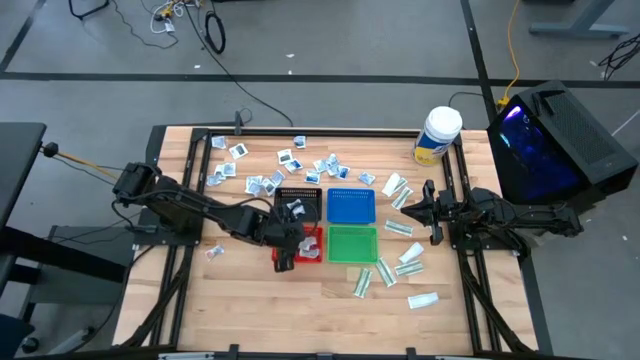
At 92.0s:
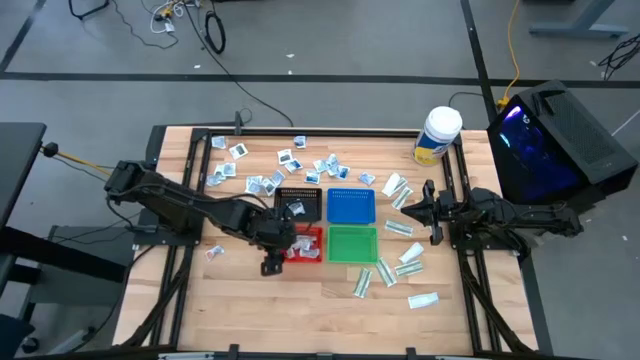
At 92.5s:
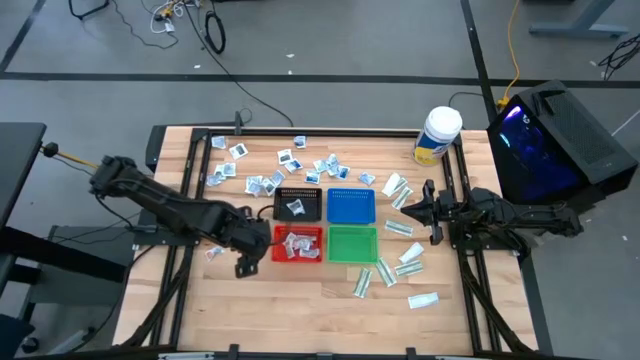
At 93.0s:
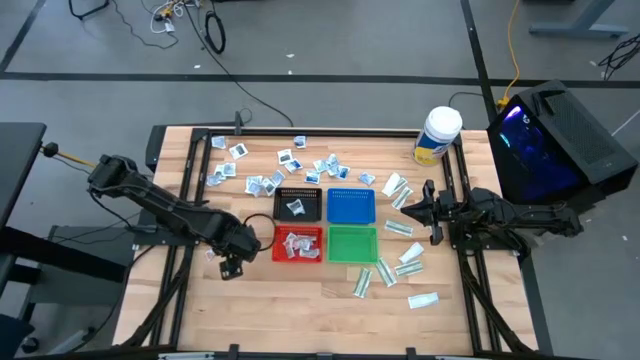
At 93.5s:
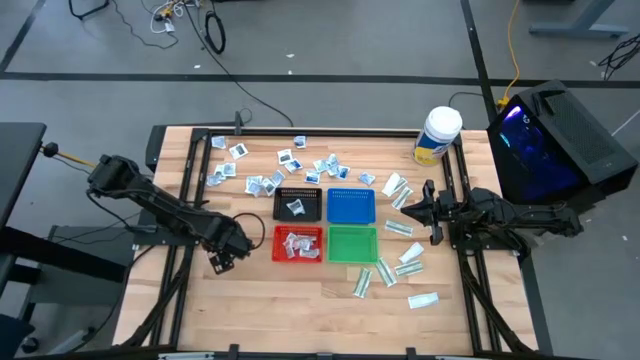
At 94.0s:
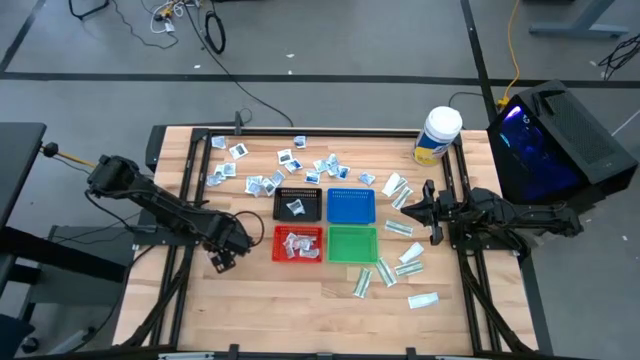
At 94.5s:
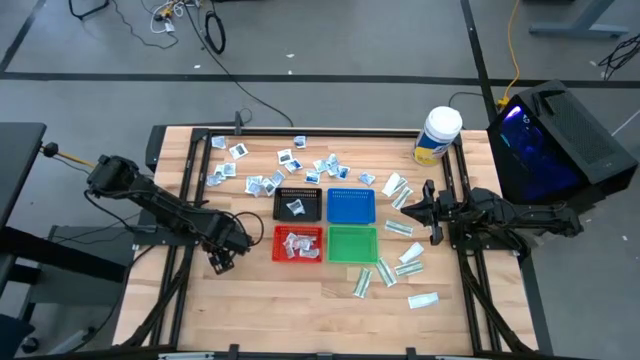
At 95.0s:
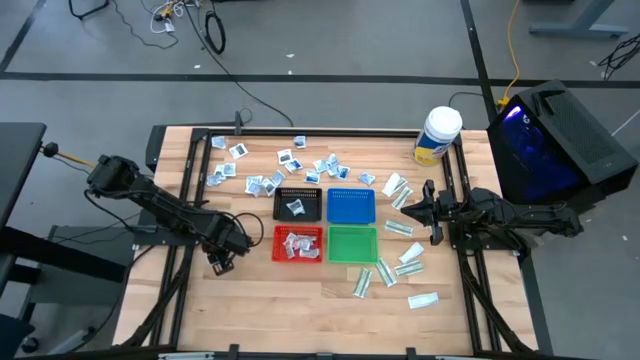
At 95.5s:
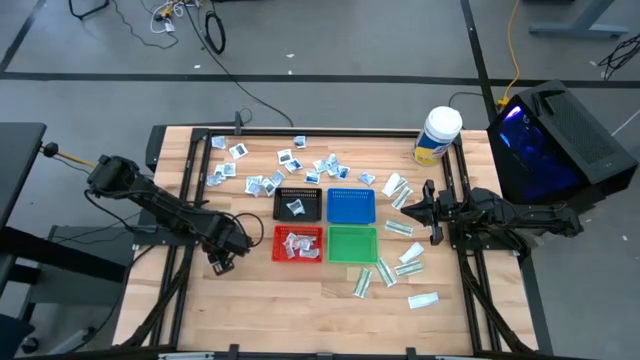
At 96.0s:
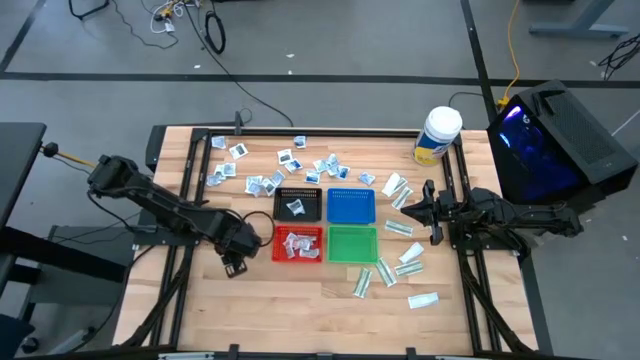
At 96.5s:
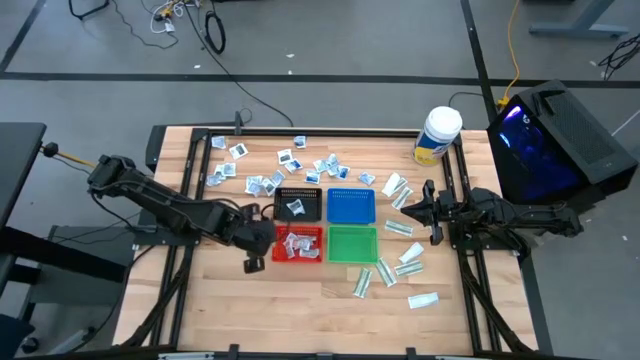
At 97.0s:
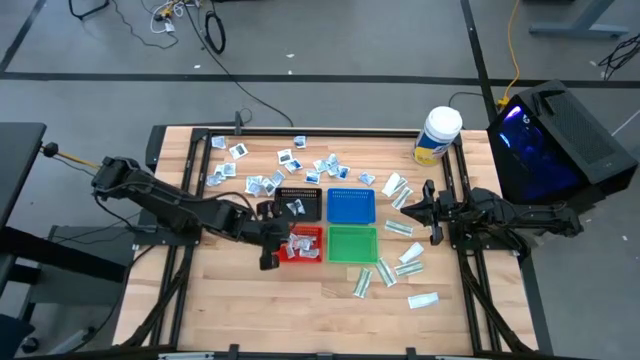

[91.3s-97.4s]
Task: Pick & Place First Aid Supplies
Put the orange ointment pack into the orange bin

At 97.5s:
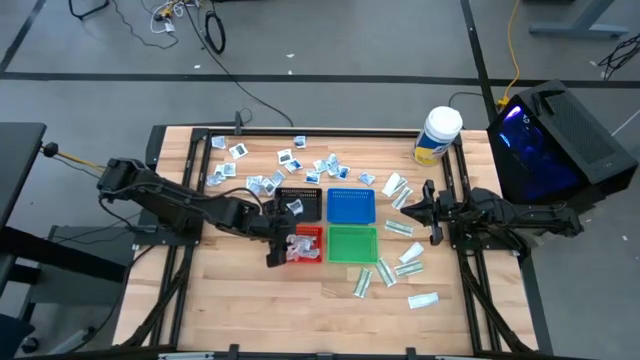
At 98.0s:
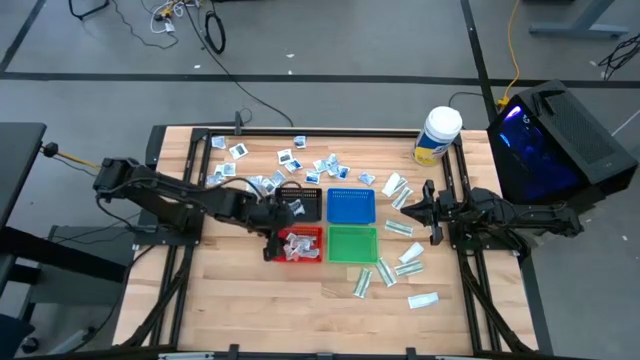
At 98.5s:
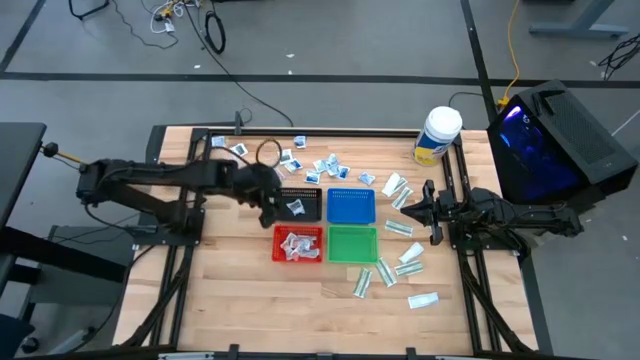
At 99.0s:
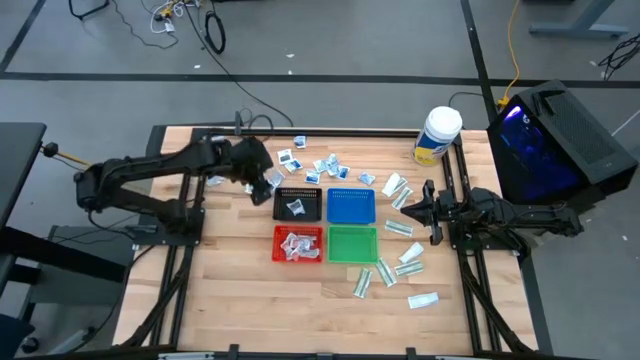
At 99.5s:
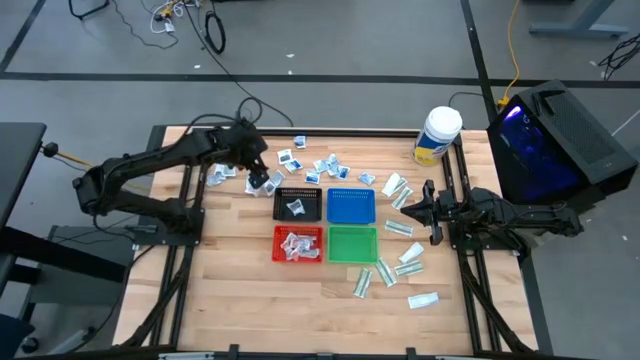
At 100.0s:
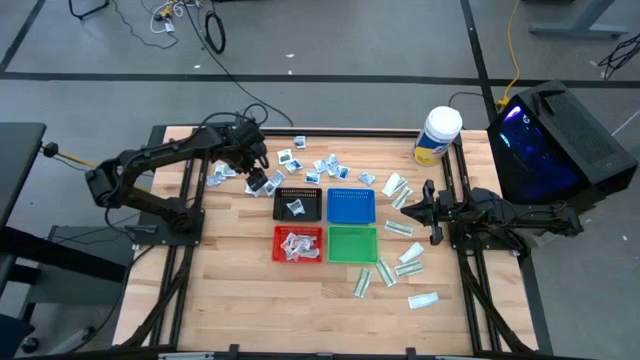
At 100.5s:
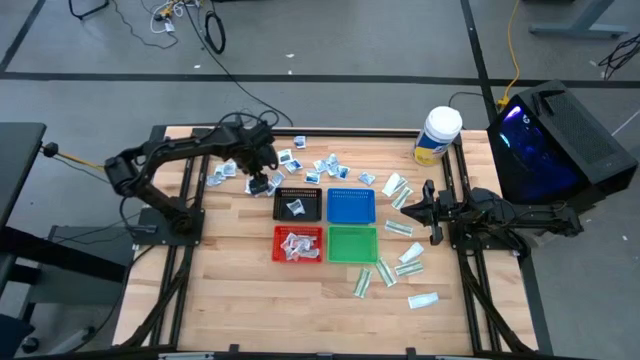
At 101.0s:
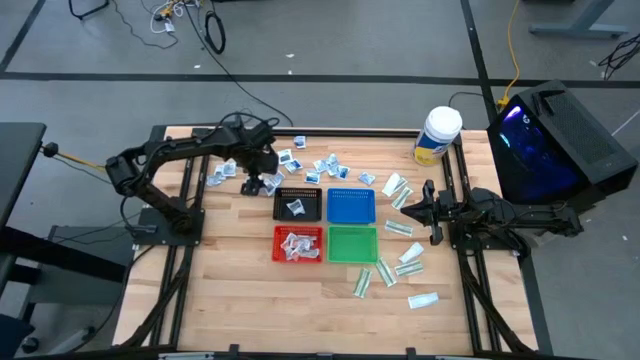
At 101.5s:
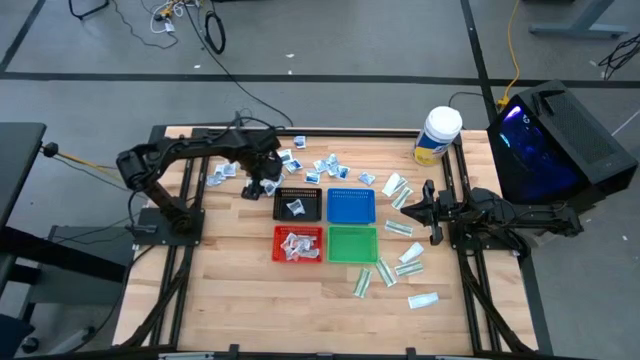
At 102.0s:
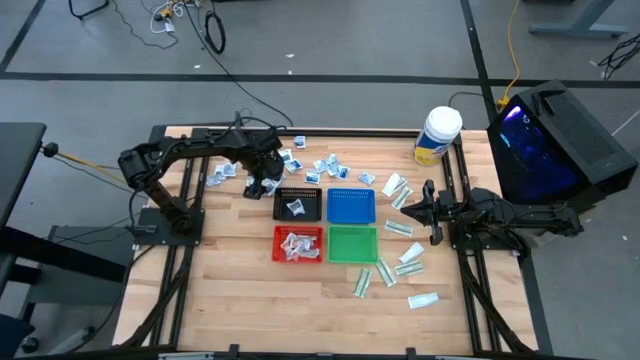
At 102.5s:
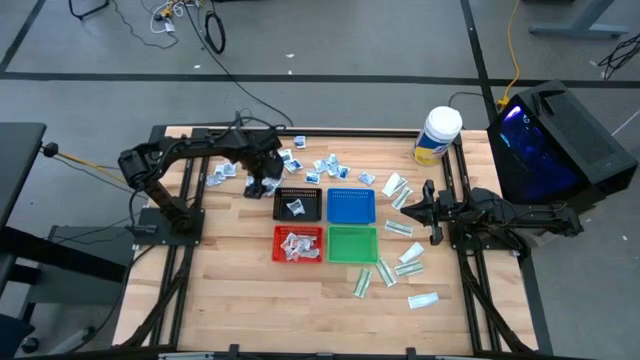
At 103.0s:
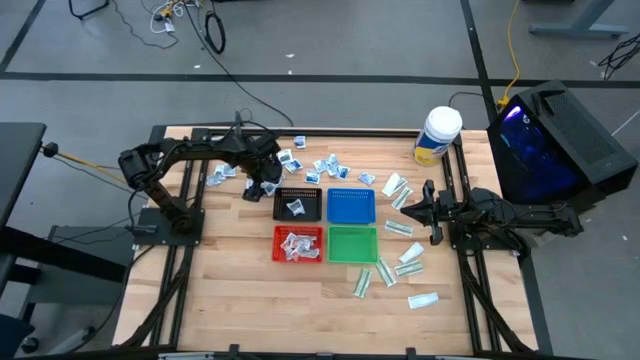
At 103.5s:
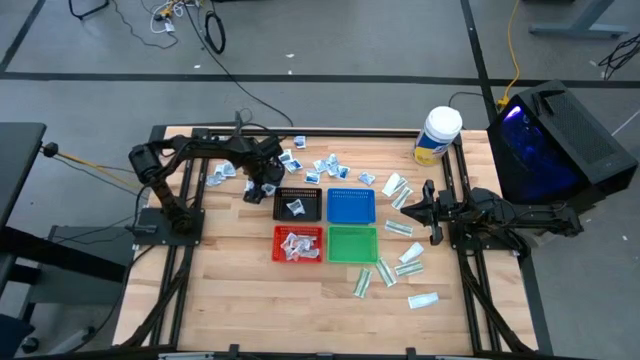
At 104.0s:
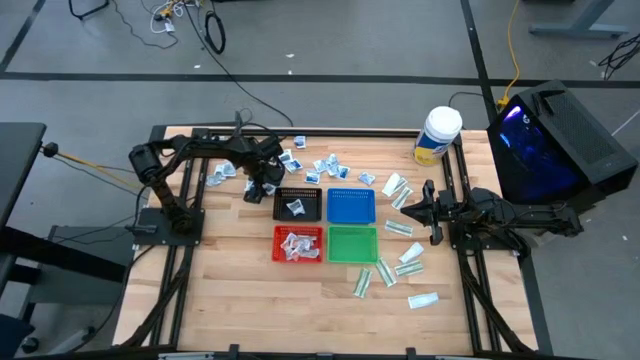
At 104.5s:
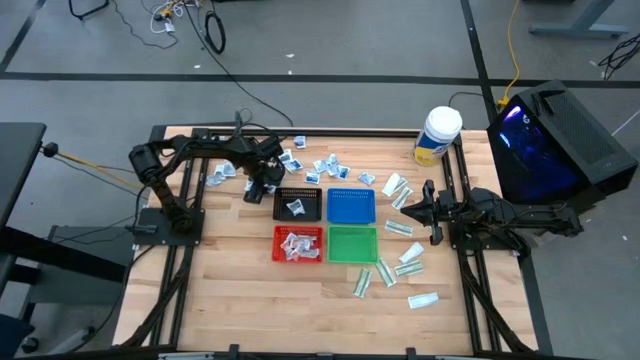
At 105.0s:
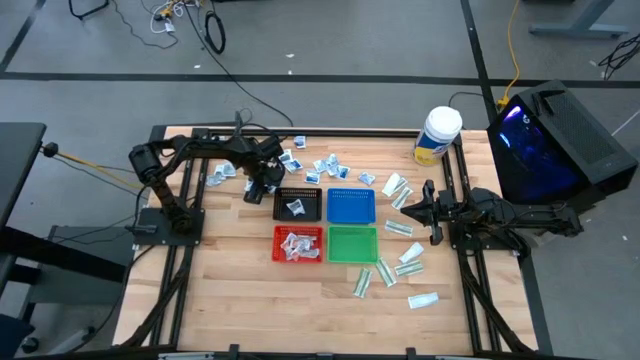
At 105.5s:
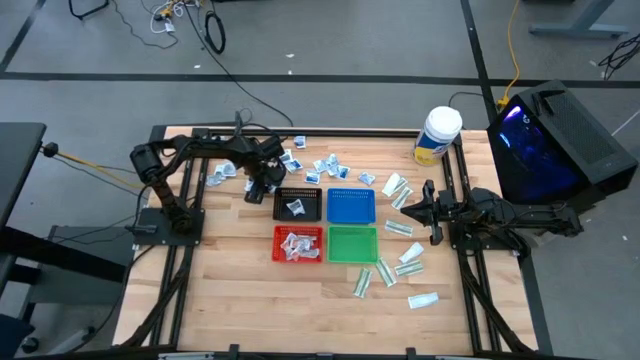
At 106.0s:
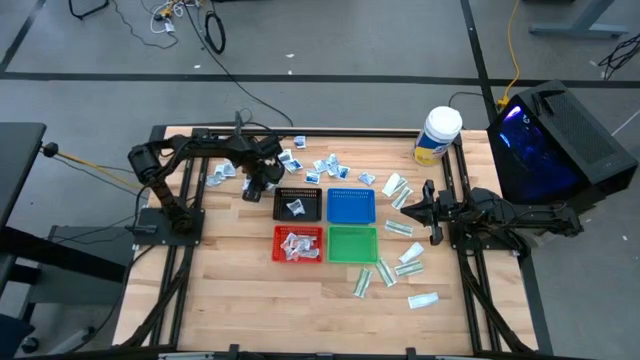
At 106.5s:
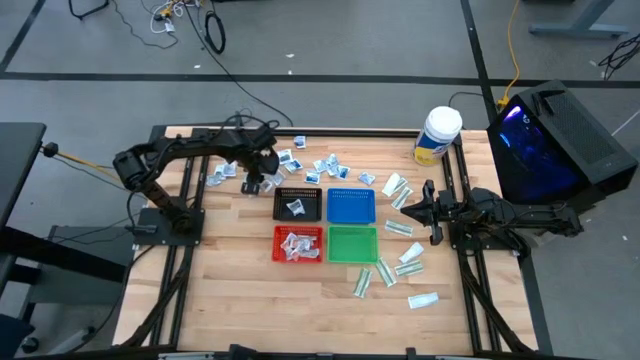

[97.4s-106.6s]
Put the gray towelette pack into the black bin

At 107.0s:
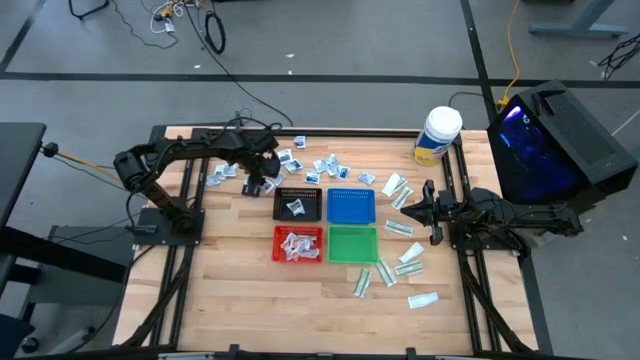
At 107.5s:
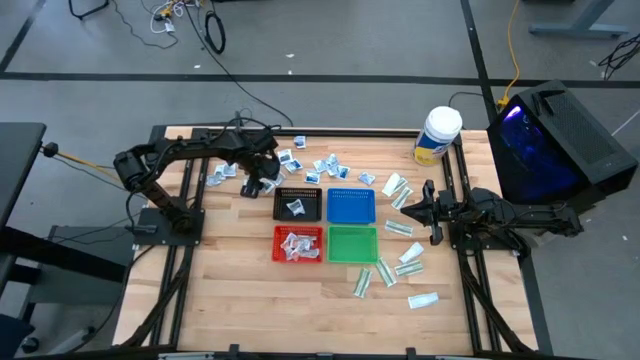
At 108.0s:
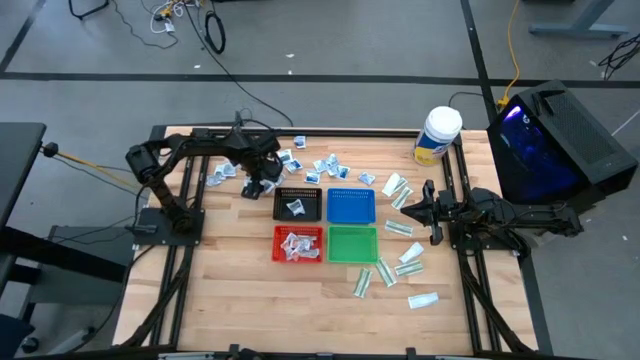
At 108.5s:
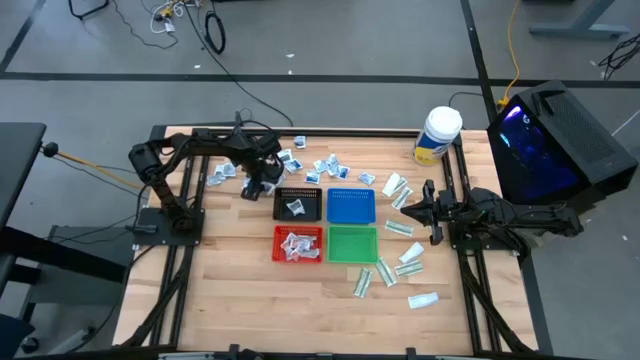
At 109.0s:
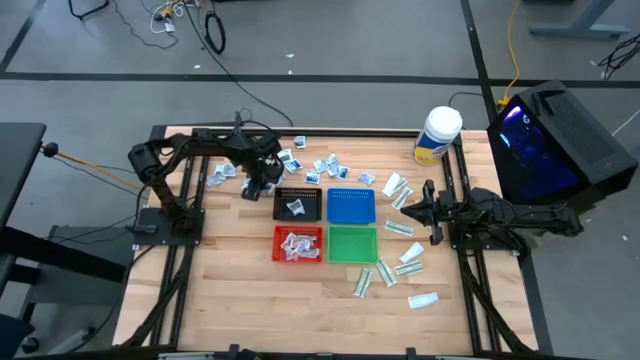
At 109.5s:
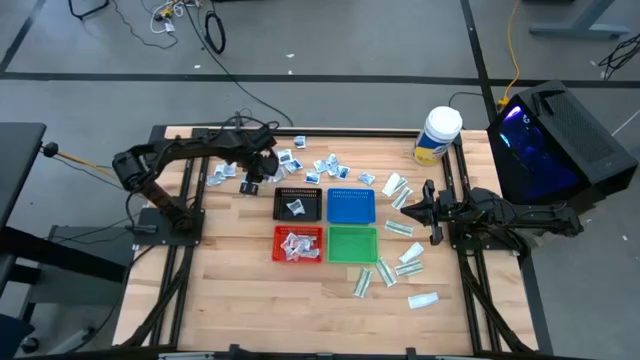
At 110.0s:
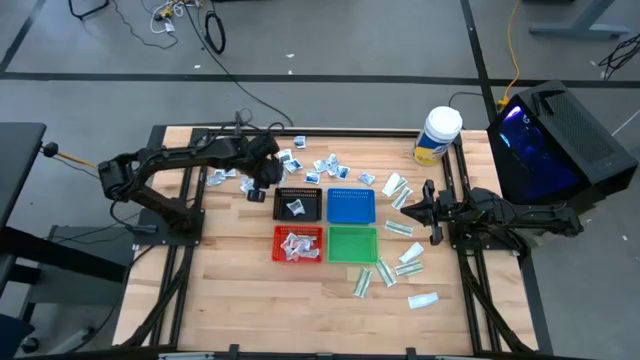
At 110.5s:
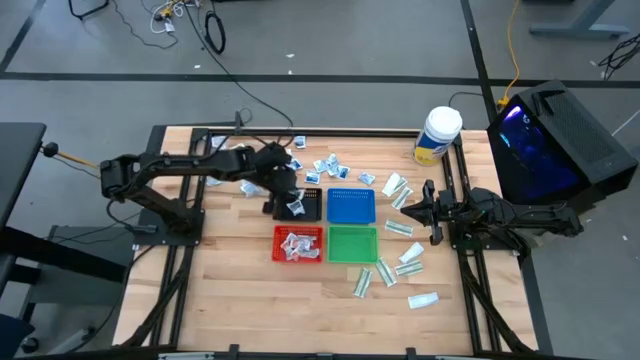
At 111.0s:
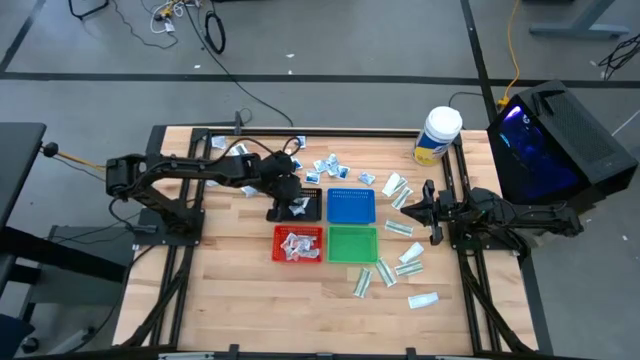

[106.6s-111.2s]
Put the gray towelette pack into the black bin

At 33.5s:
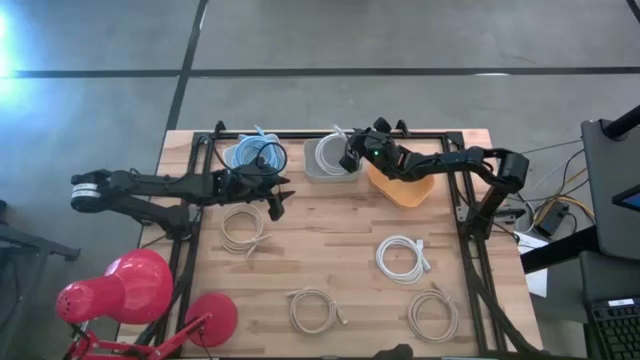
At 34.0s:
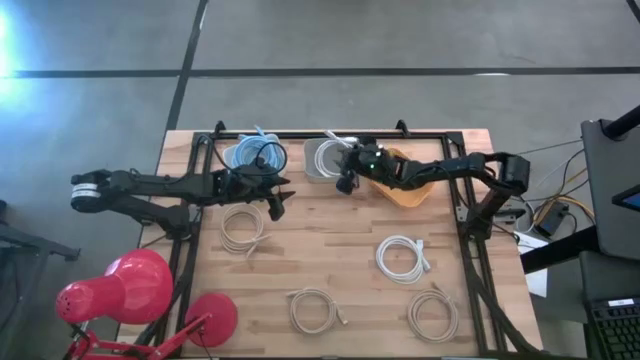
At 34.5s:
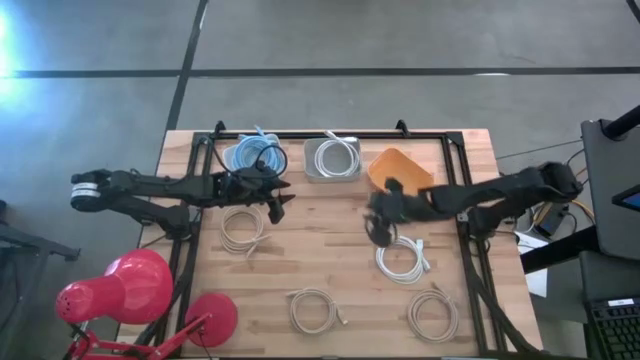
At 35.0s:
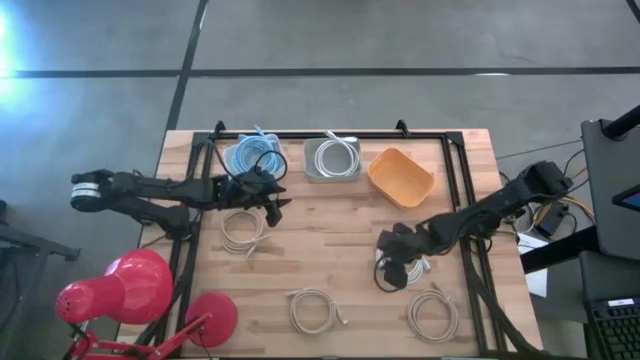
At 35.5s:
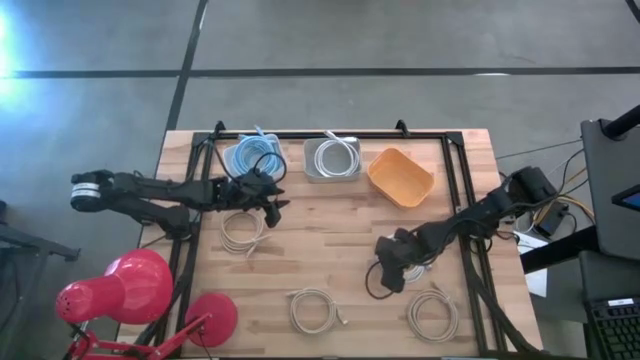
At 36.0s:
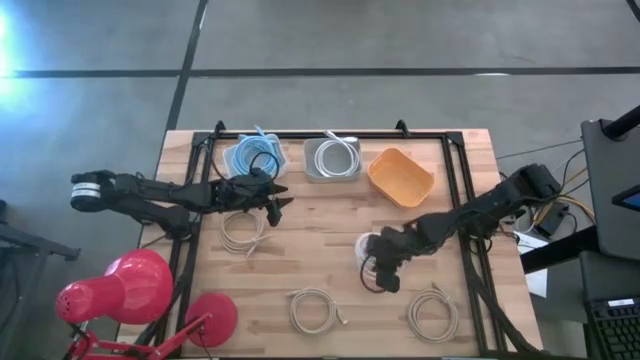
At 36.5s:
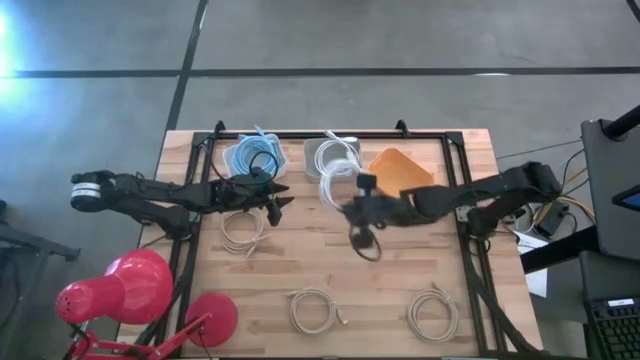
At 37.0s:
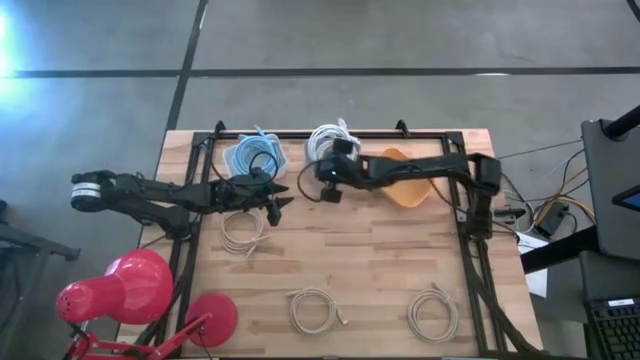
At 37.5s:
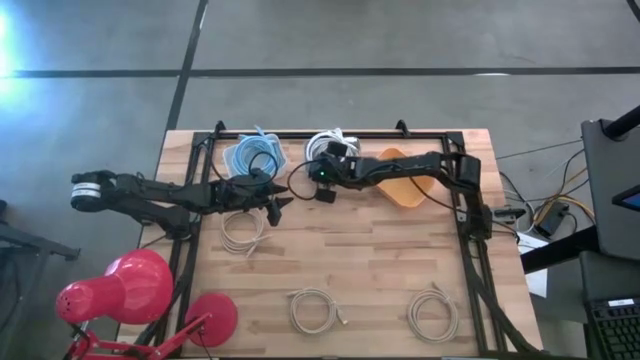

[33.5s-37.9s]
Task: Pick & Place USB Port
Put the white cable into the gray bin
